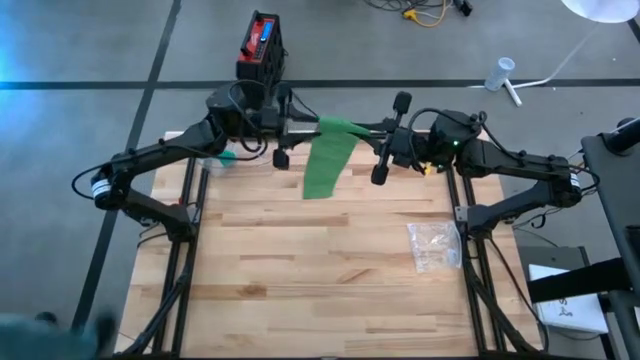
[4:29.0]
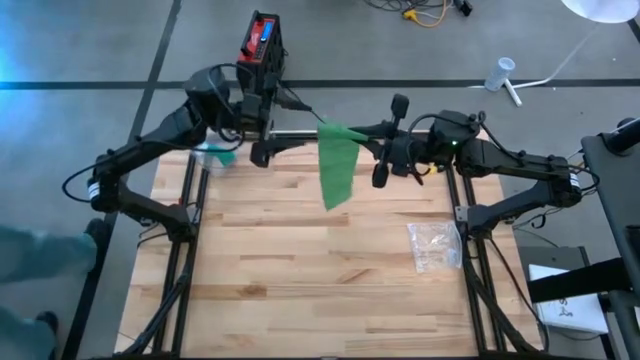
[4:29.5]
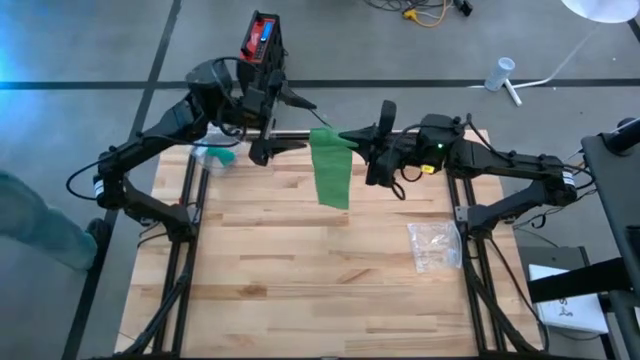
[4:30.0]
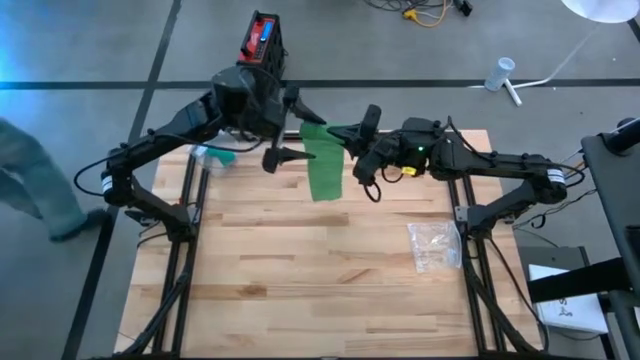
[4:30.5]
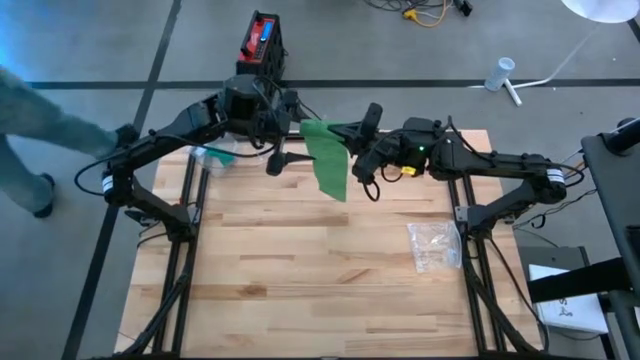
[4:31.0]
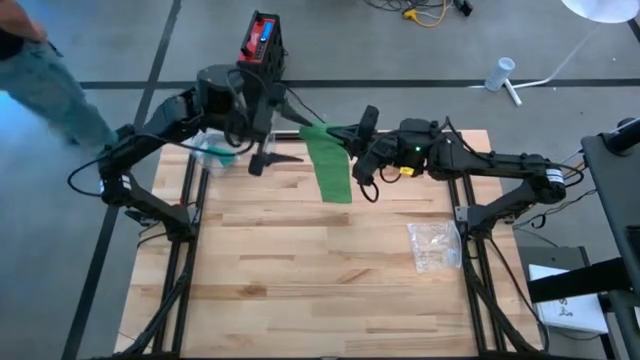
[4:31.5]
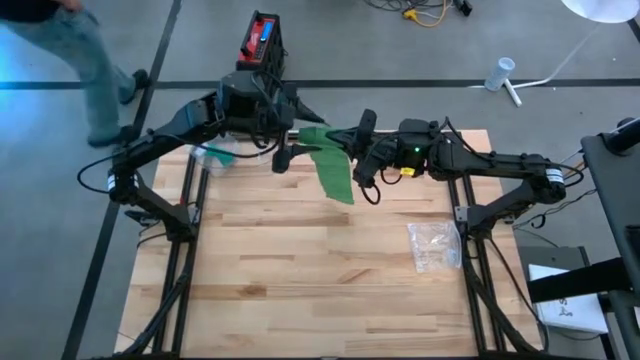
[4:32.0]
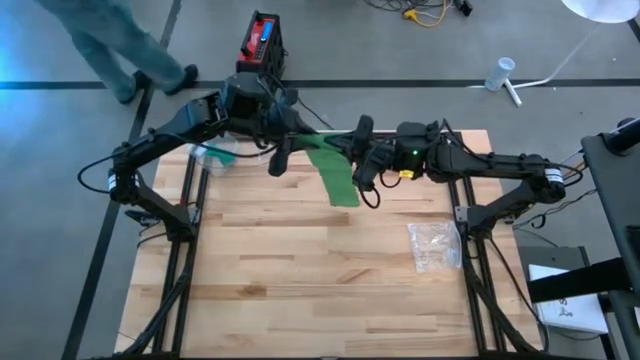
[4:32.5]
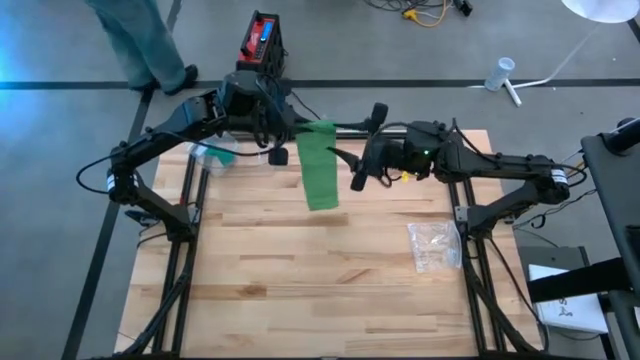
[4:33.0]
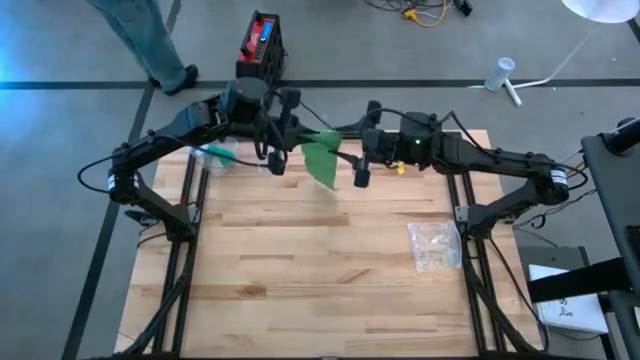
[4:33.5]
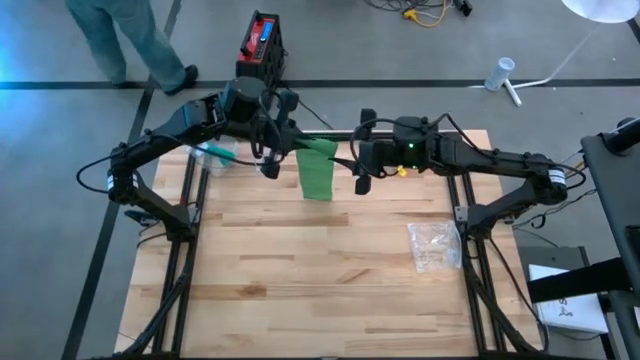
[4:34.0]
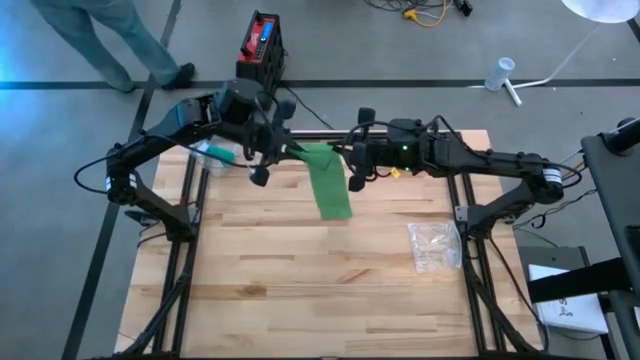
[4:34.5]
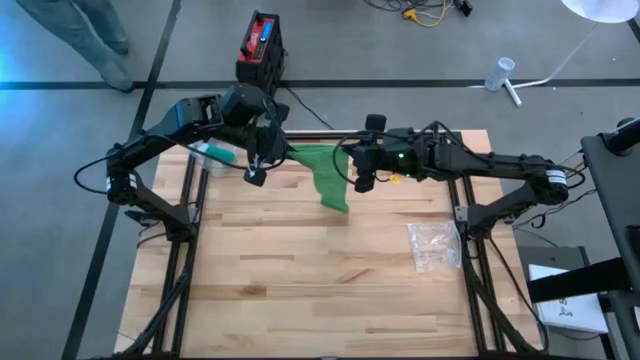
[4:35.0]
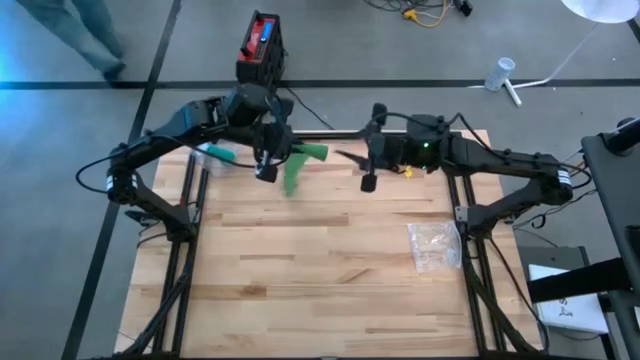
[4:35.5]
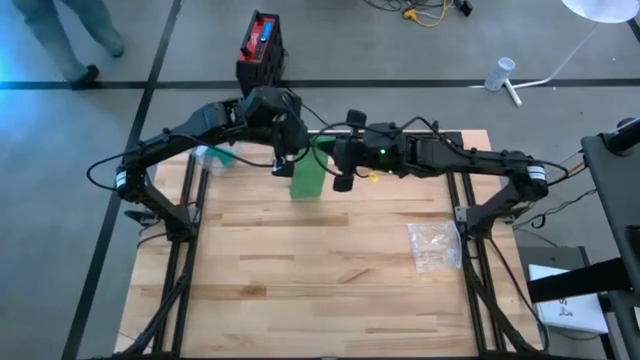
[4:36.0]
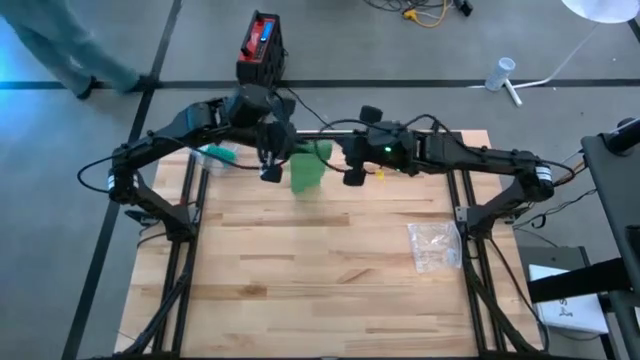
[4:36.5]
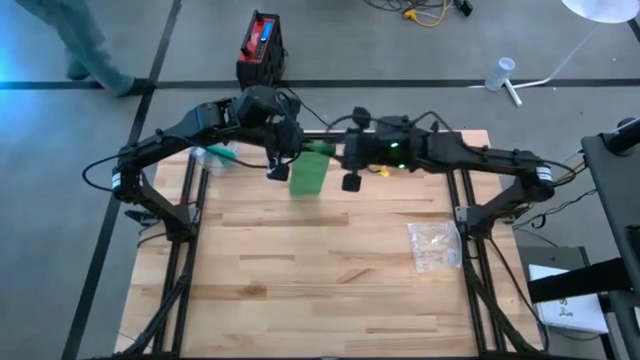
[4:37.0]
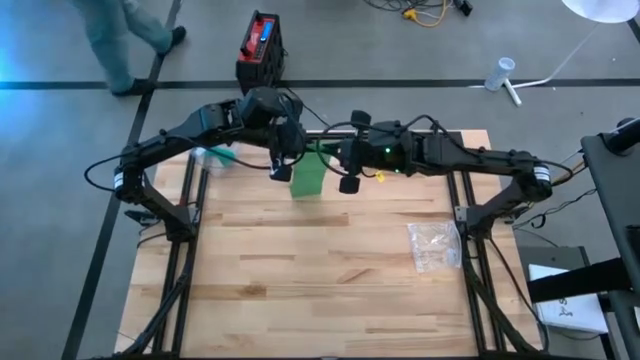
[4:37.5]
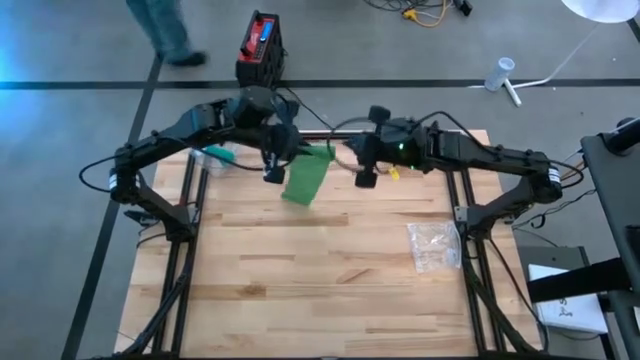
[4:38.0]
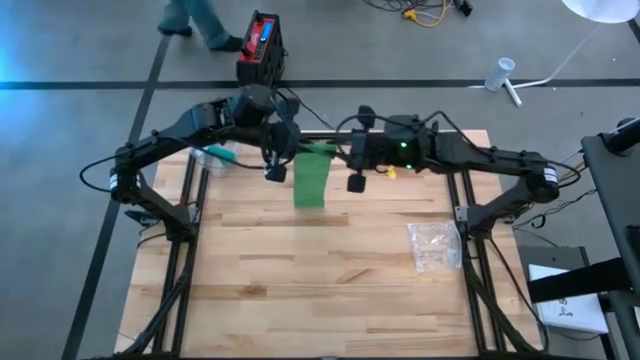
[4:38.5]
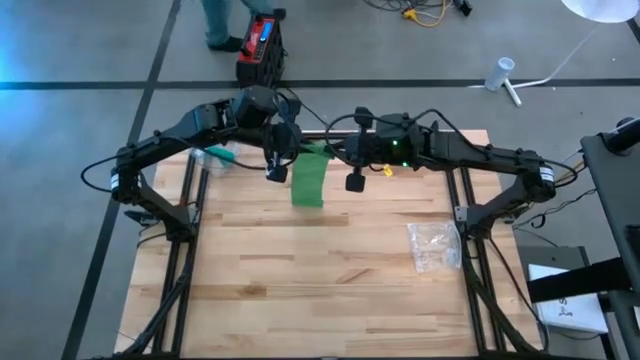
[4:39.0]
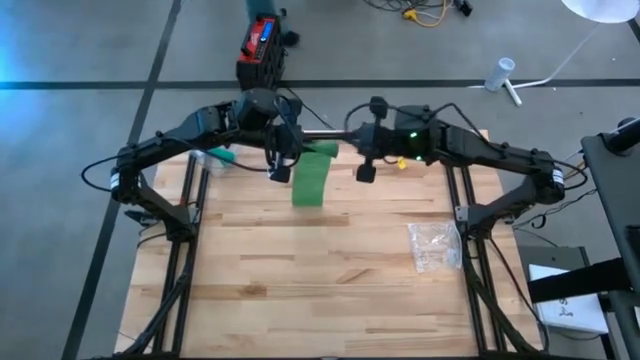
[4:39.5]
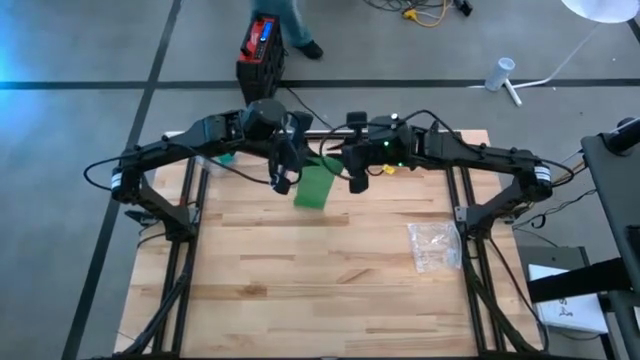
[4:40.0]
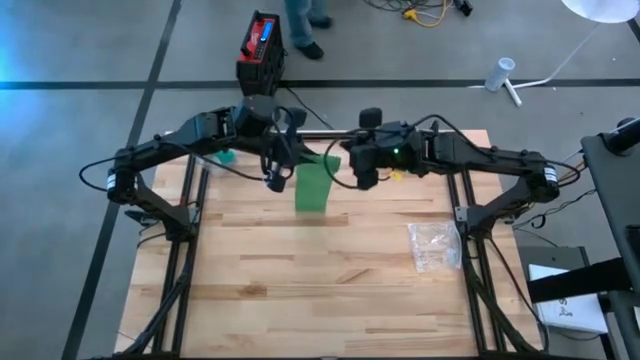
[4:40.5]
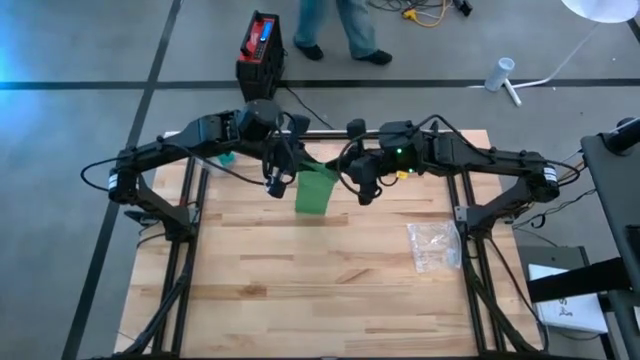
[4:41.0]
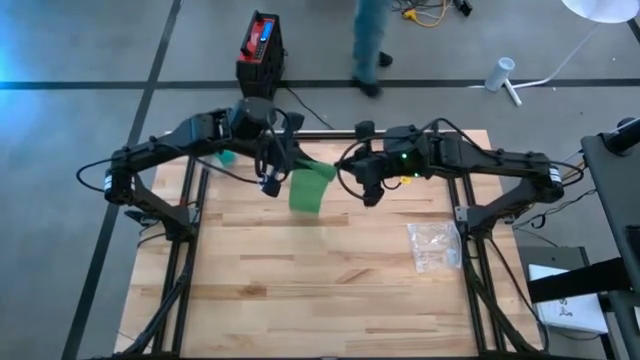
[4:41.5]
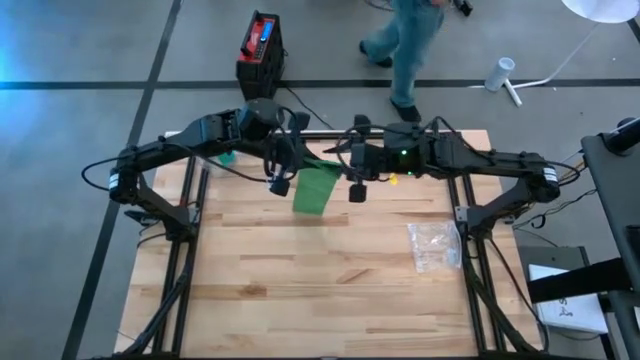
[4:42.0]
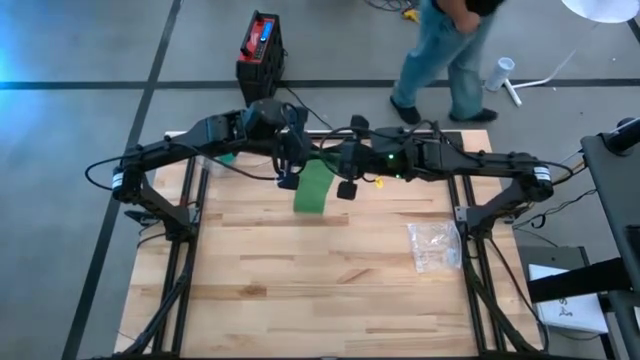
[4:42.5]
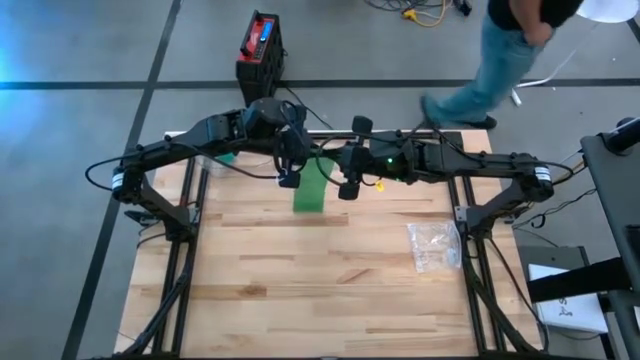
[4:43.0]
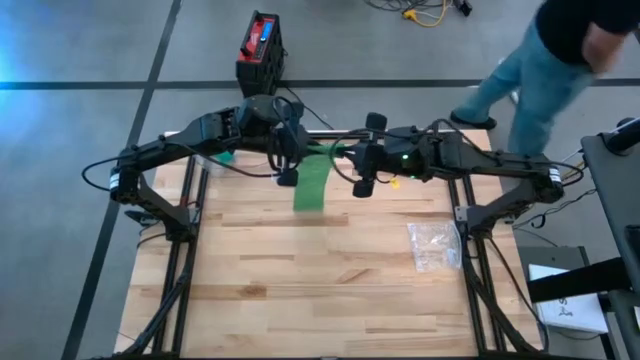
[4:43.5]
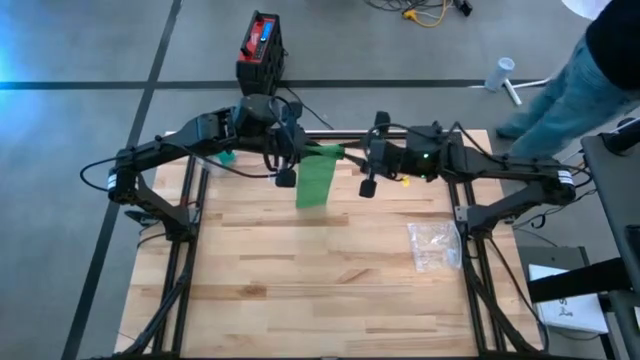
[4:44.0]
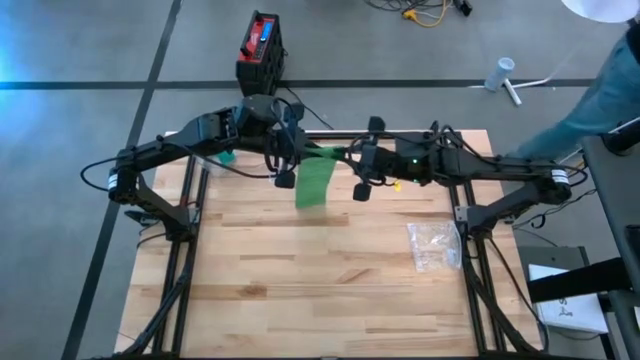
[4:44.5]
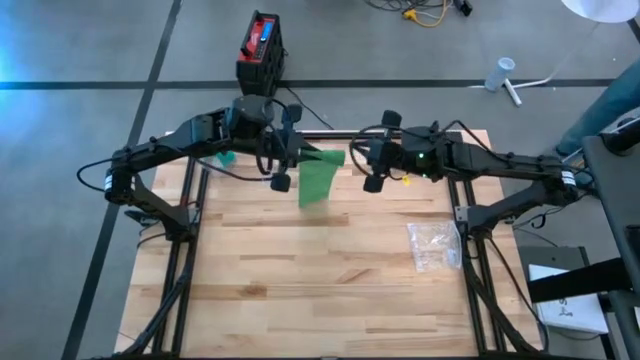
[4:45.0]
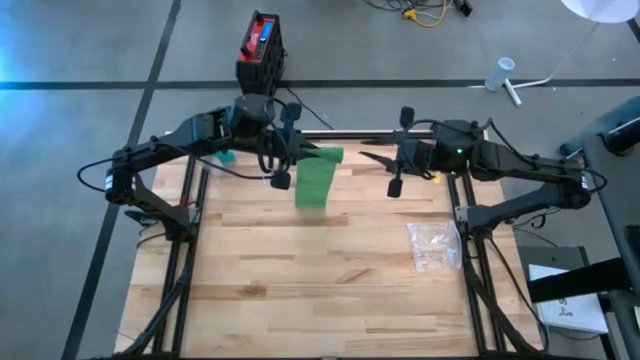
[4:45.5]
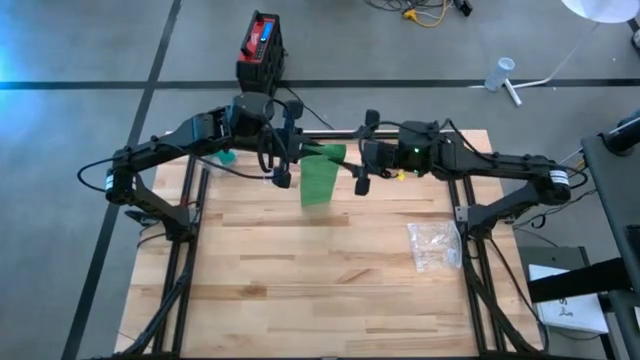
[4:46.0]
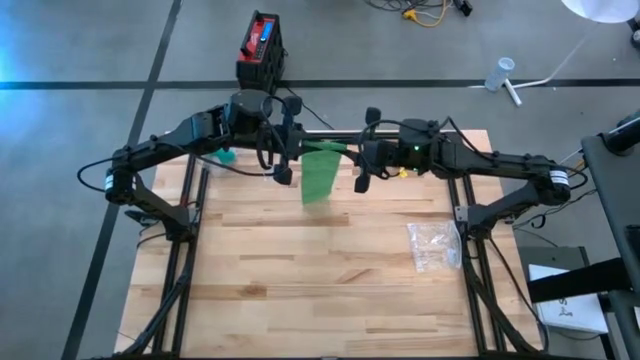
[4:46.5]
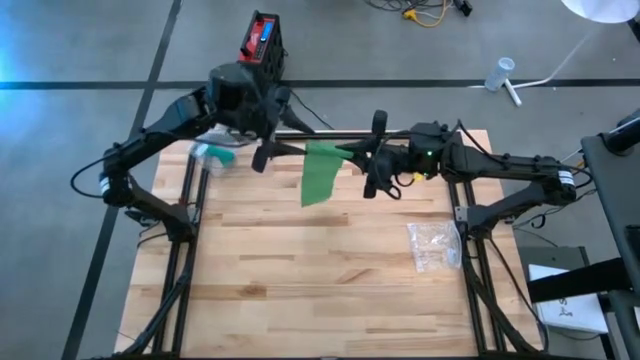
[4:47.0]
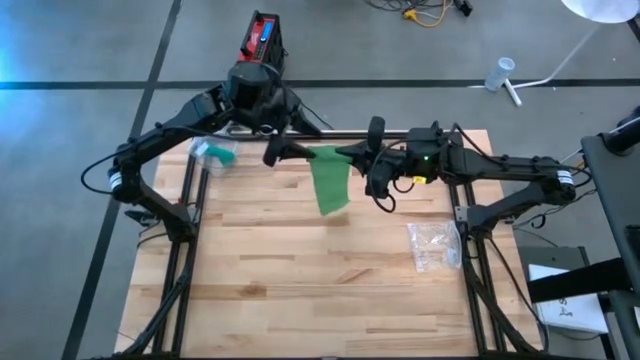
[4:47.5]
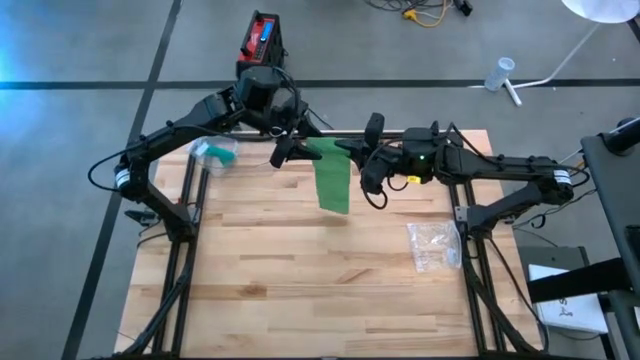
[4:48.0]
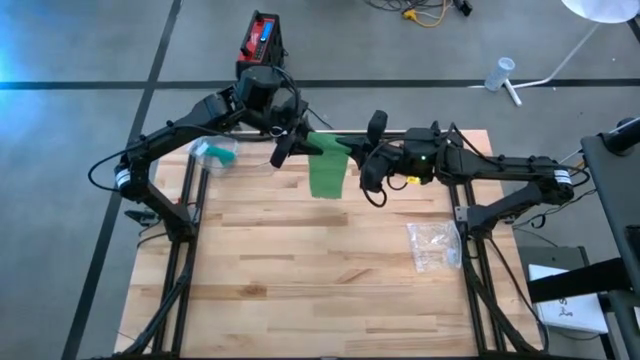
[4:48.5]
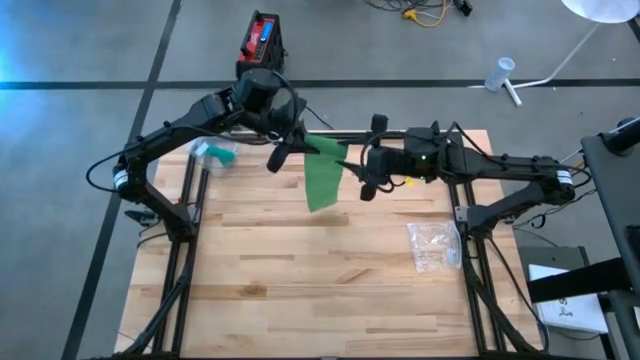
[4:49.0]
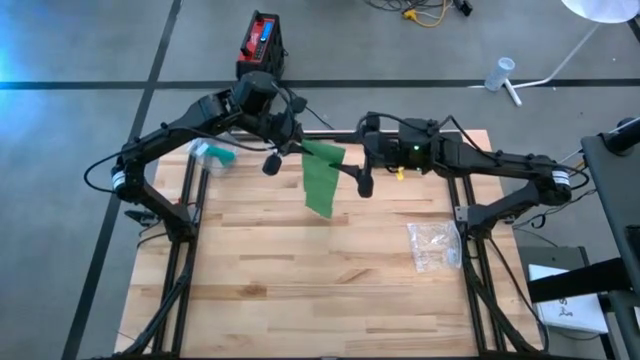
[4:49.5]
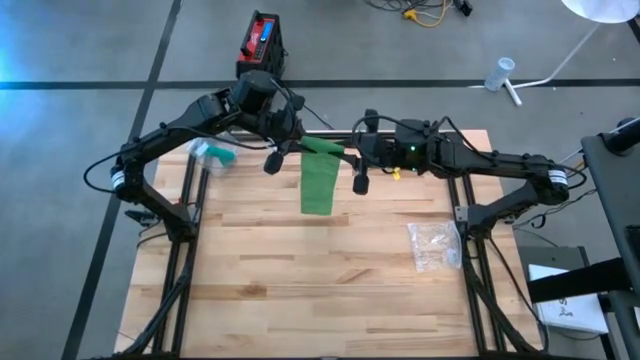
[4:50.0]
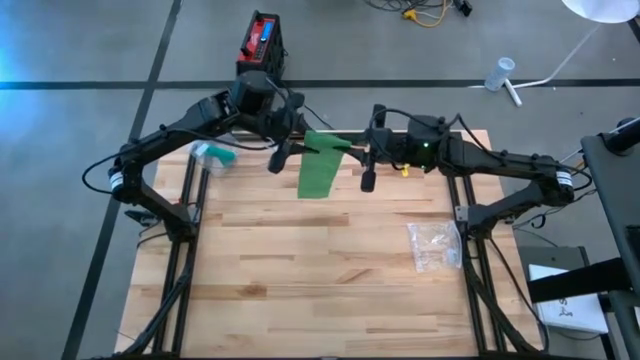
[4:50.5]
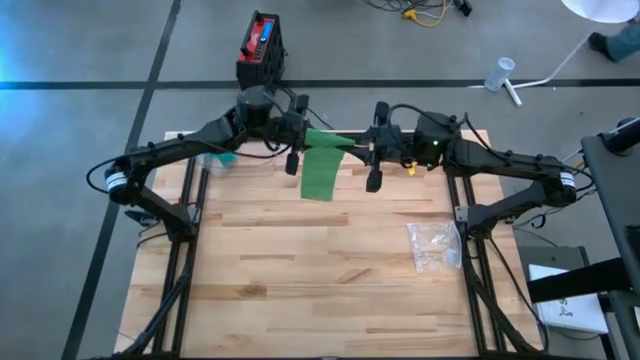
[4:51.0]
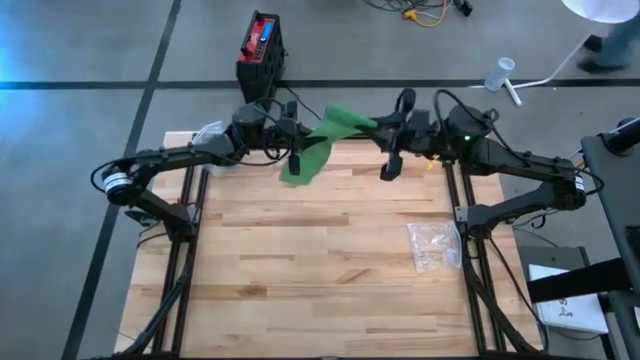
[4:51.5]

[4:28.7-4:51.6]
Task: Roll bandage
Roll the green bandage
